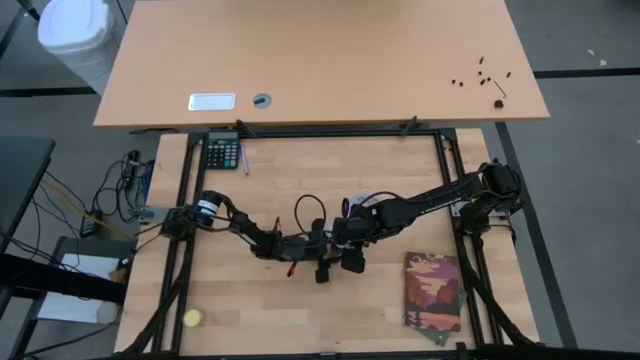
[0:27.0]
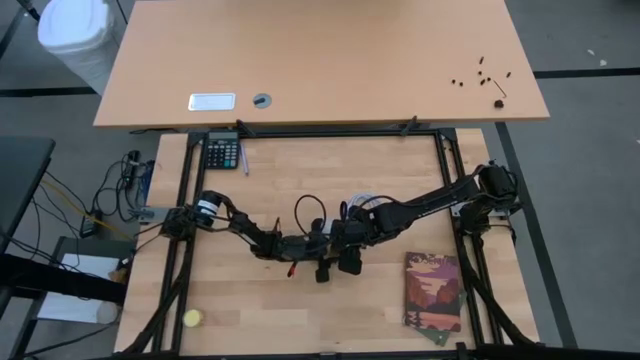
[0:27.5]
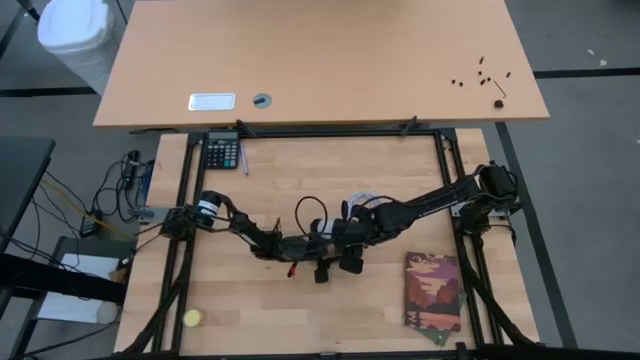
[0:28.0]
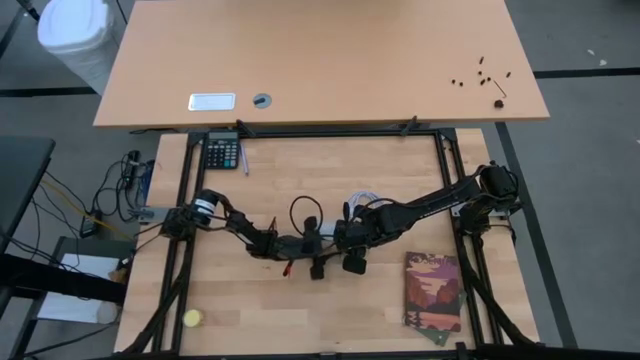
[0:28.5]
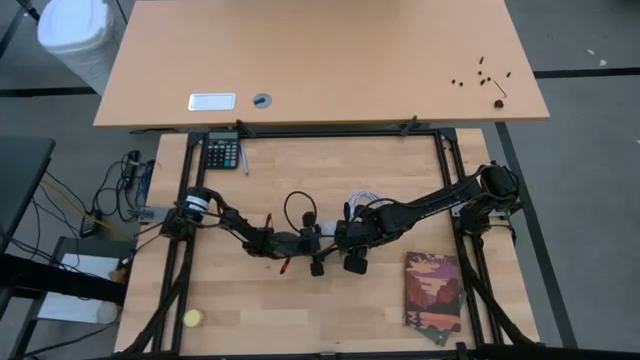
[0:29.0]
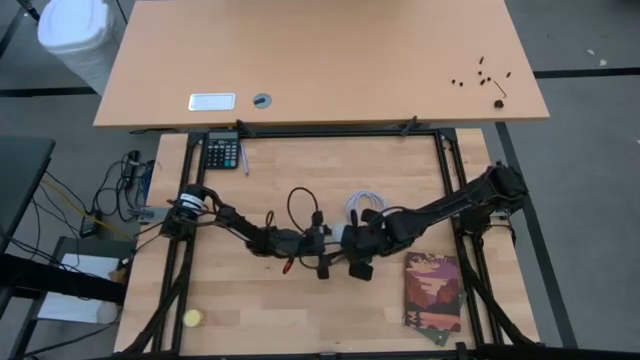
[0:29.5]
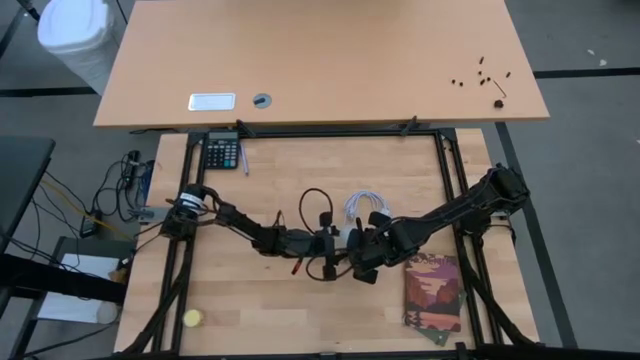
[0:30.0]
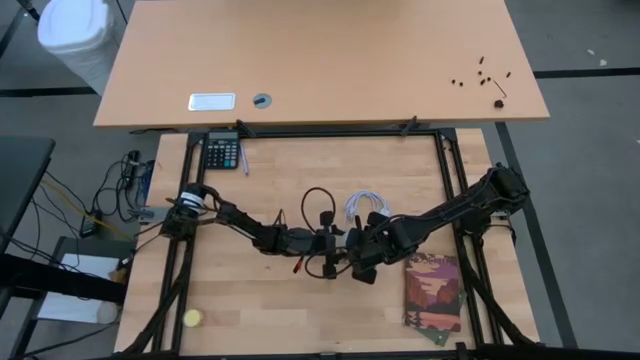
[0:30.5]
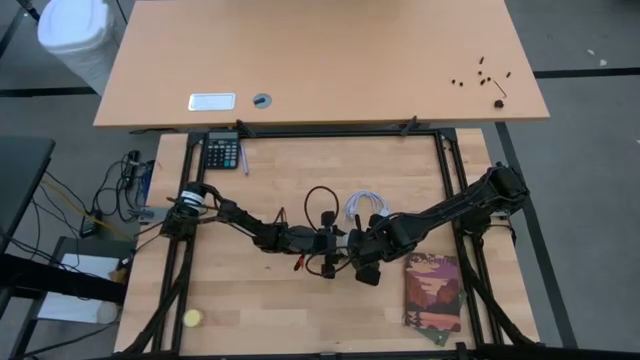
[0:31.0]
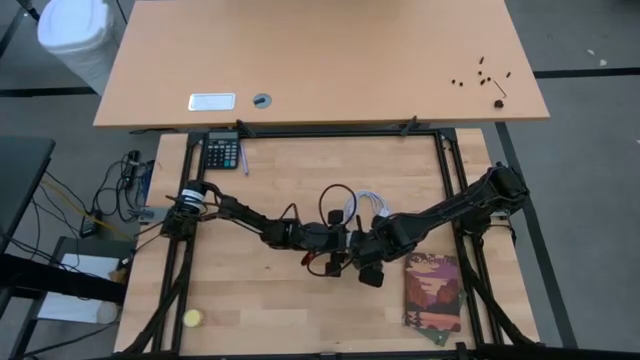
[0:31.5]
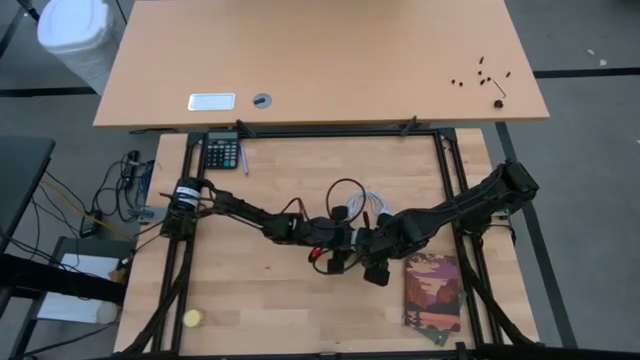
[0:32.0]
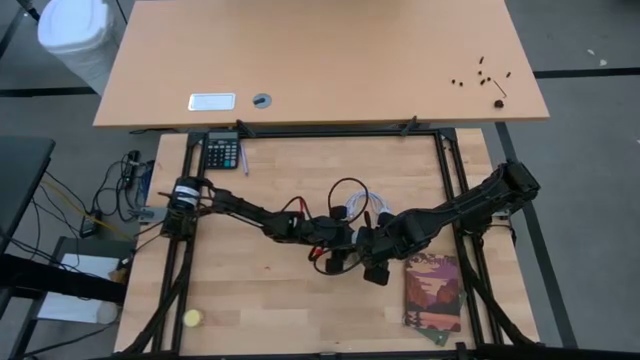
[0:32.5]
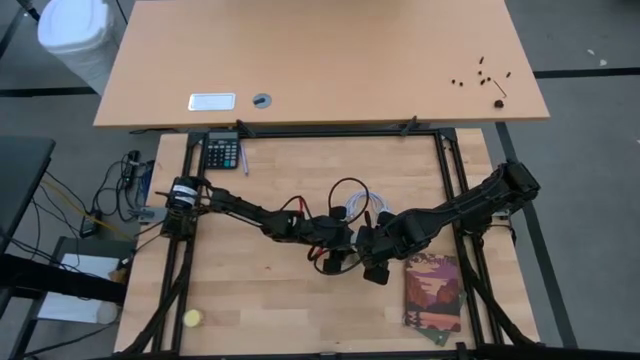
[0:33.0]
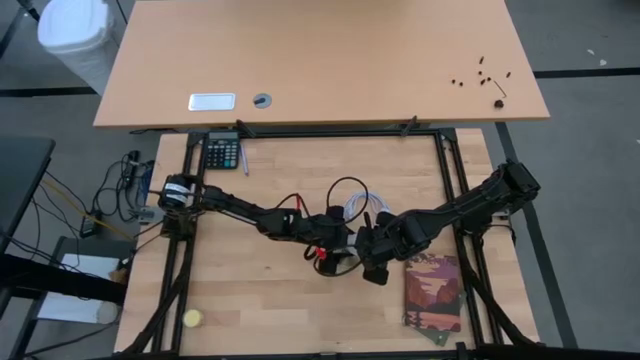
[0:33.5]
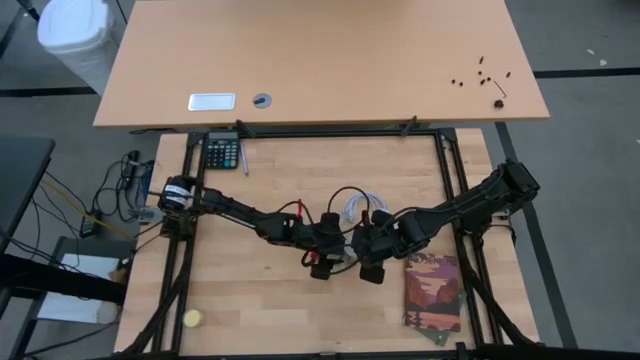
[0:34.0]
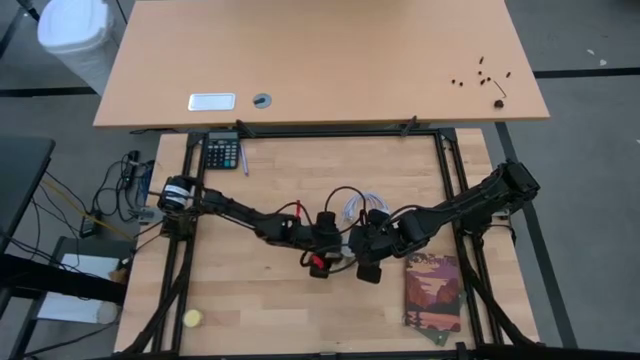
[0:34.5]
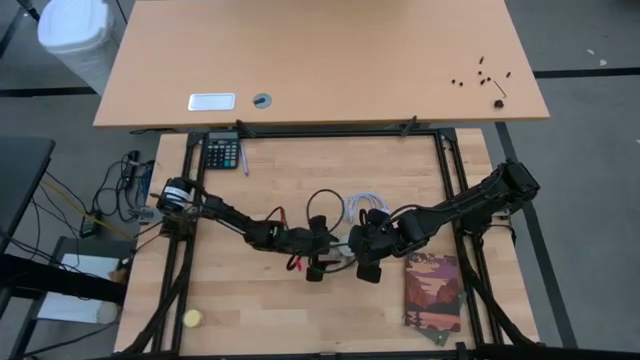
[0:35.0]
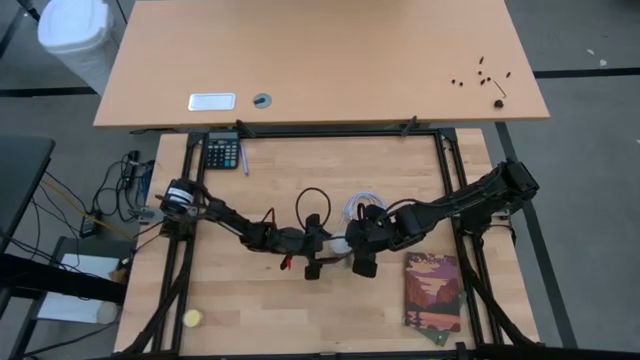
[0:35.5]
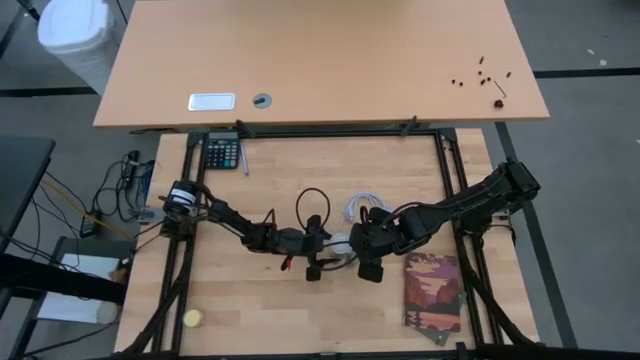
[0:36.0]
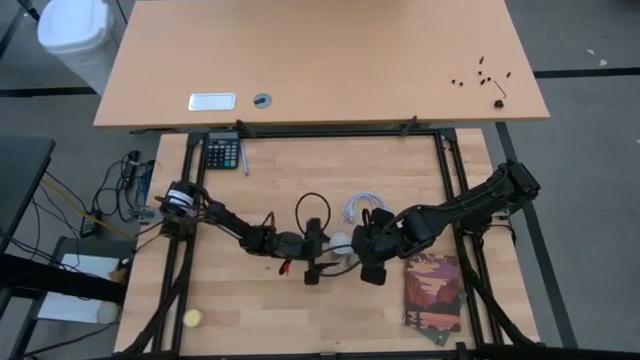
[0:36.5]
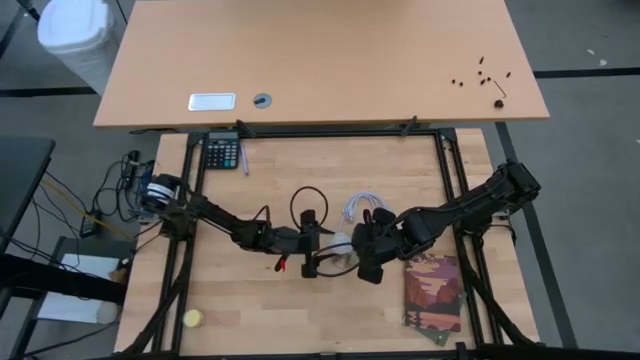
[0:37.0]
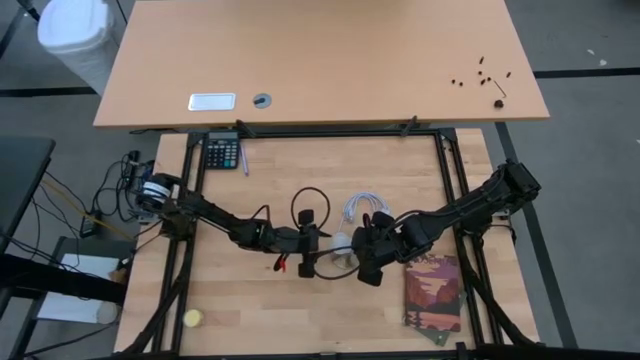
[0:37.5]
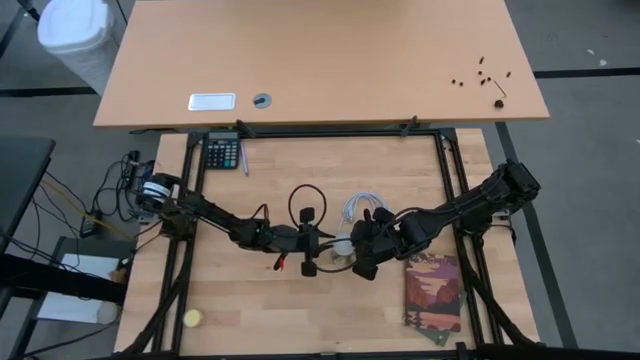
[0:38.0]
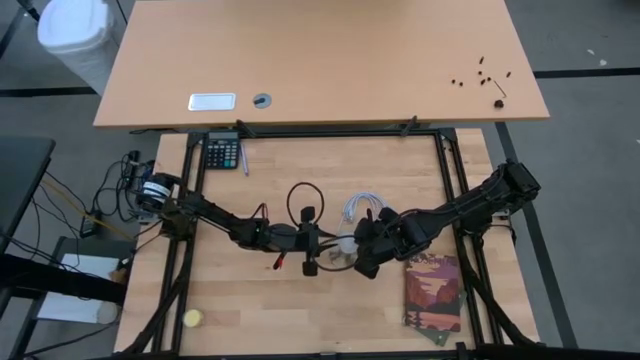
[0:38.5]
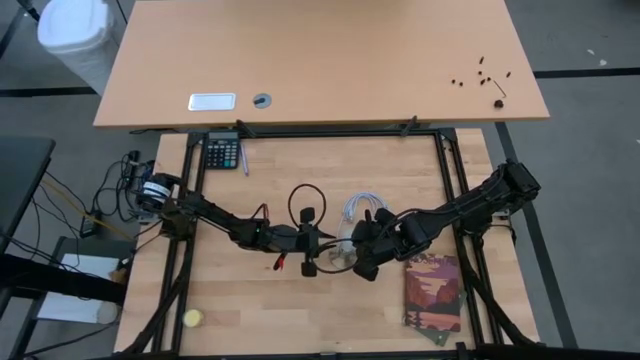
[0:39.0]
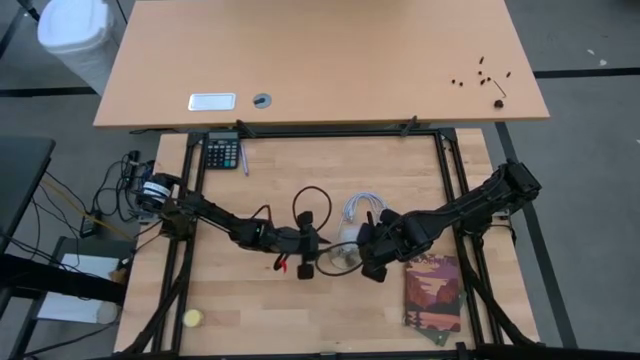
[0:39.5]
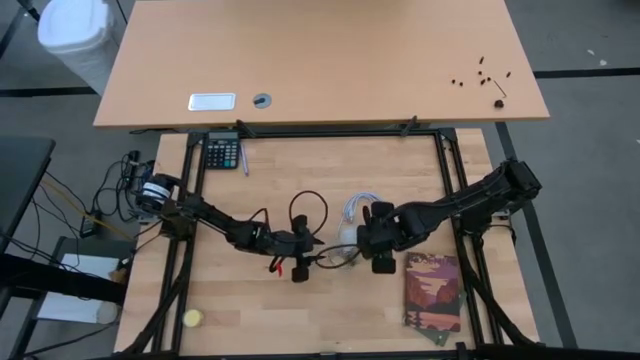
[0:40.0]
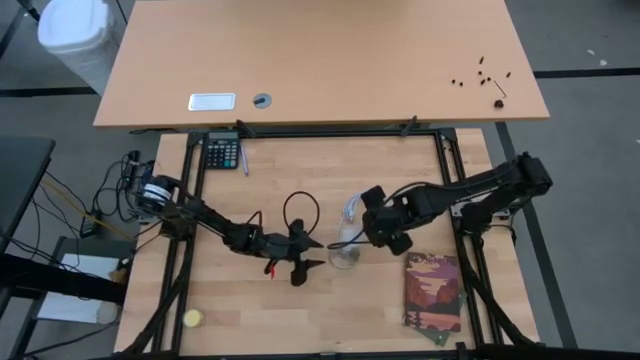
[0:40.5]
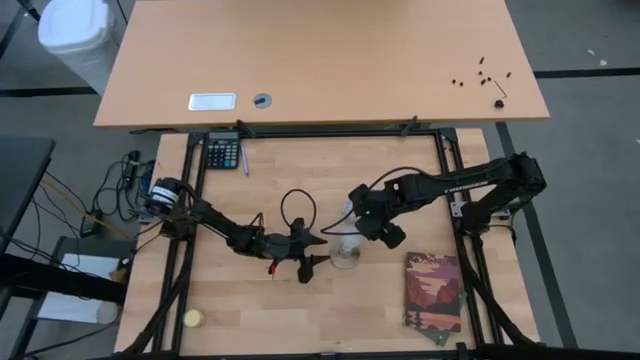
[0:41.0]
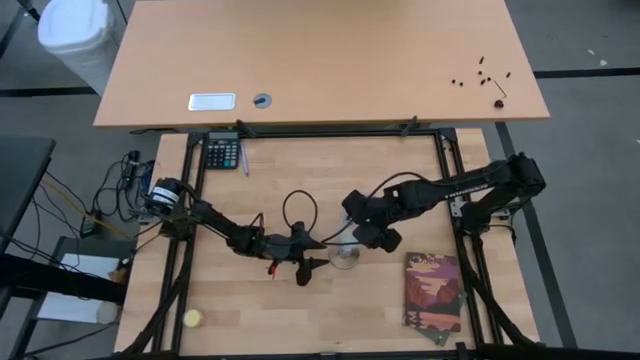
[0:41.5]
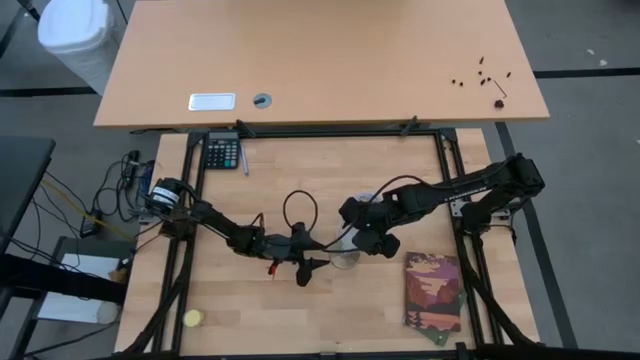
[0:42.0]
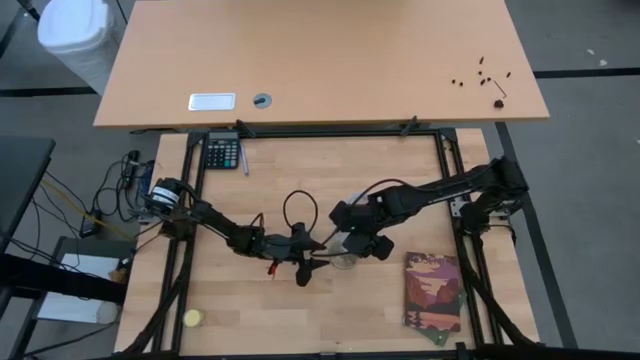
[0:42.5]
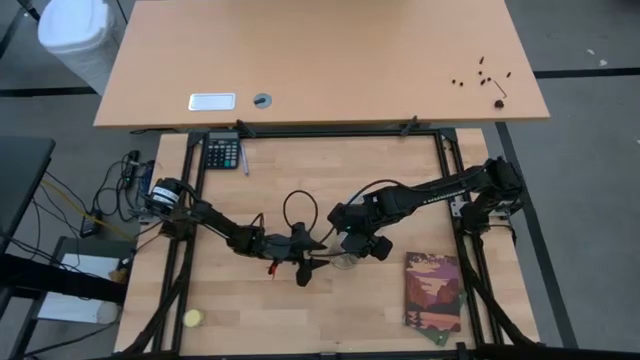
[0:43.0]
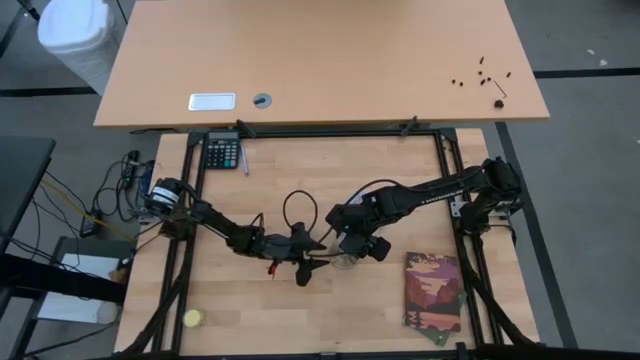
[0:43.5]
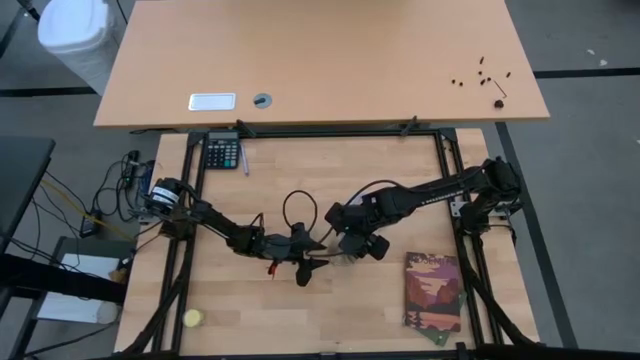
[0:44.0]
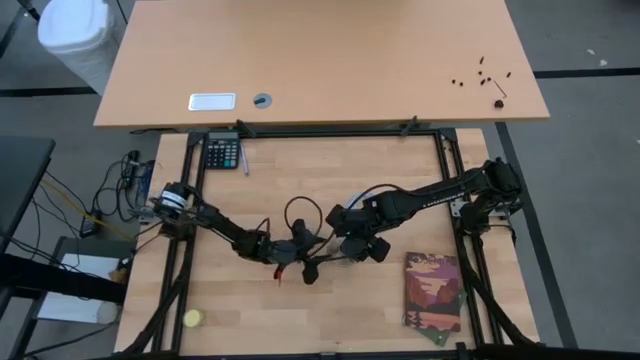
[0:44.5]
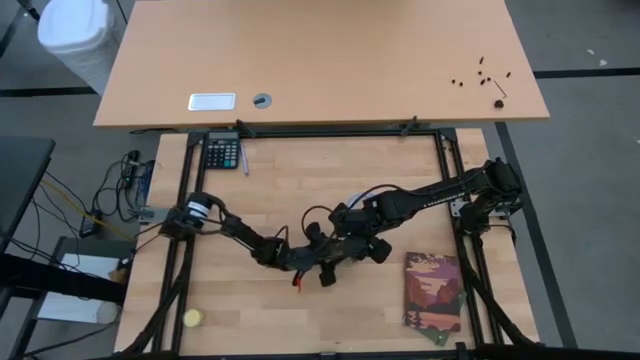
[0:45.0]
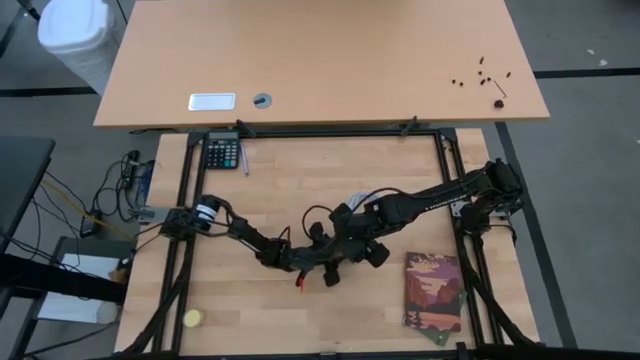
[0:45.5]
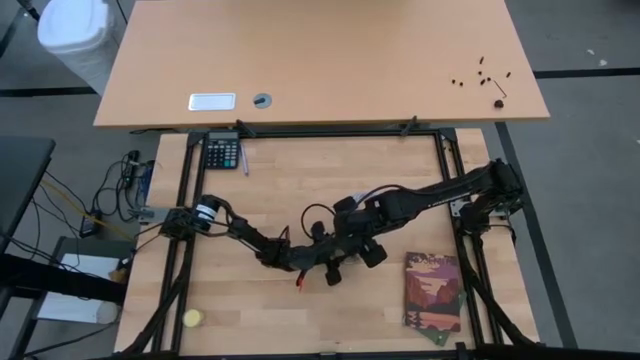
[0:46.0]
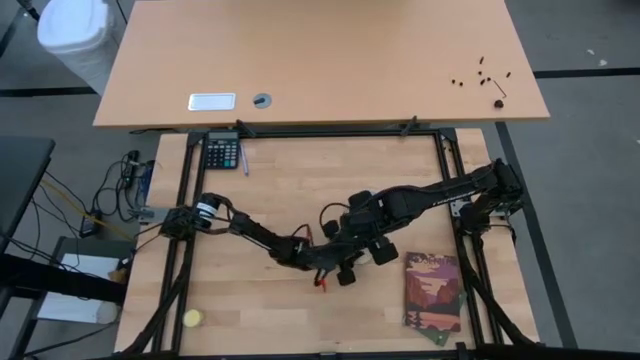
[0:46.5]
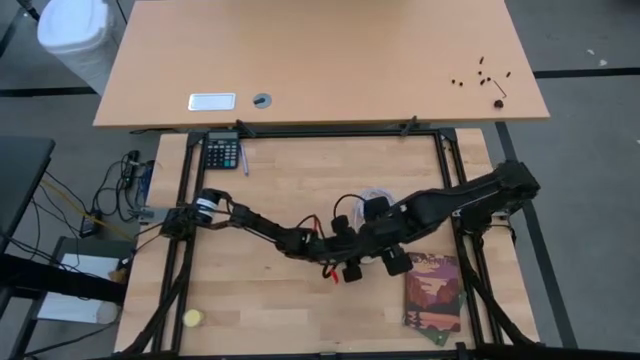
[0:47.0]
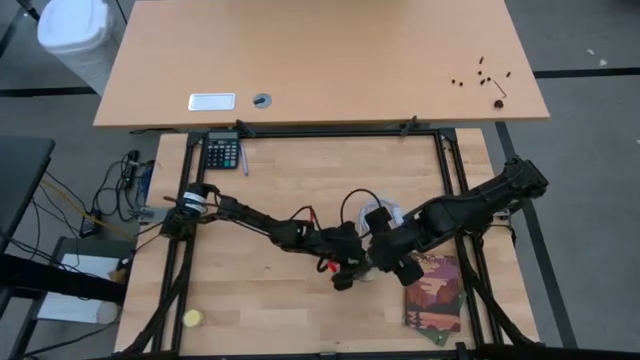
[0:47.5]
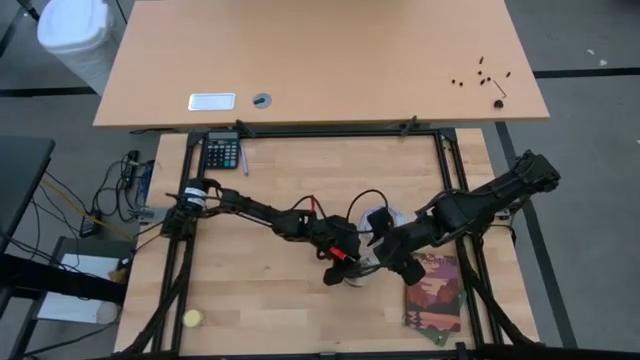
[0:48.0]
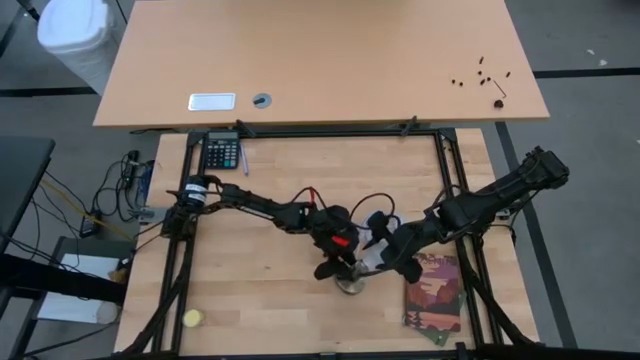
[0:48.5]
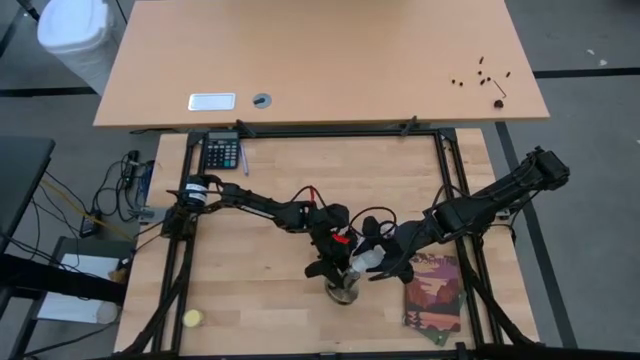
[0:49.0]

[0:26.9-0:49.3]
Task: Screw lightbulb
Insert the lightbulb into the lamp socket
